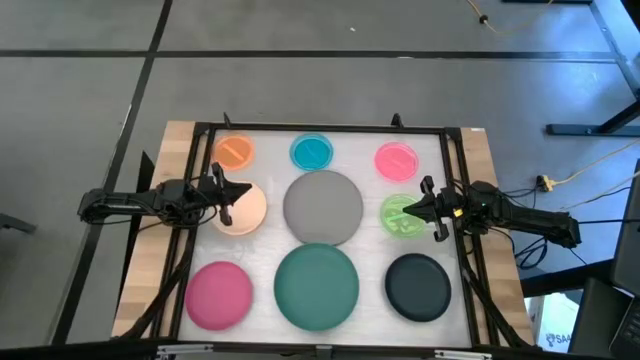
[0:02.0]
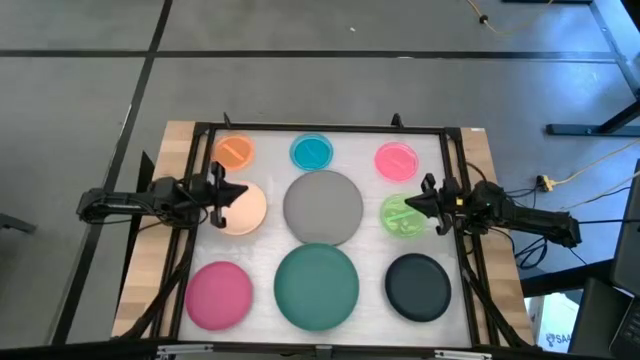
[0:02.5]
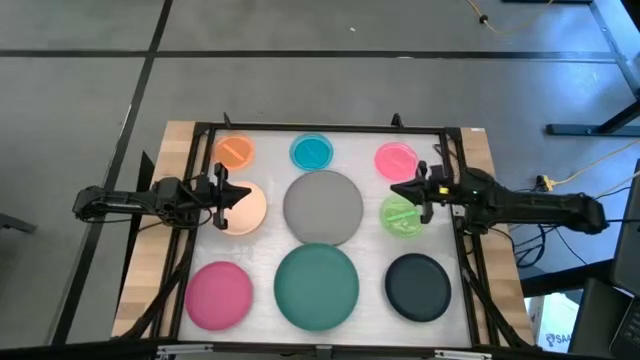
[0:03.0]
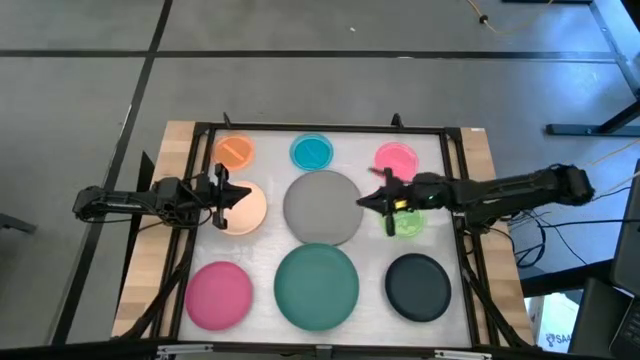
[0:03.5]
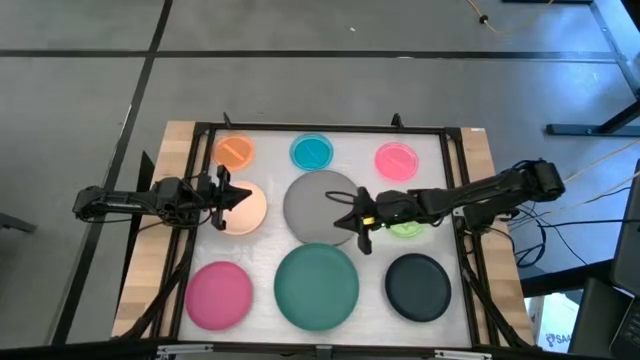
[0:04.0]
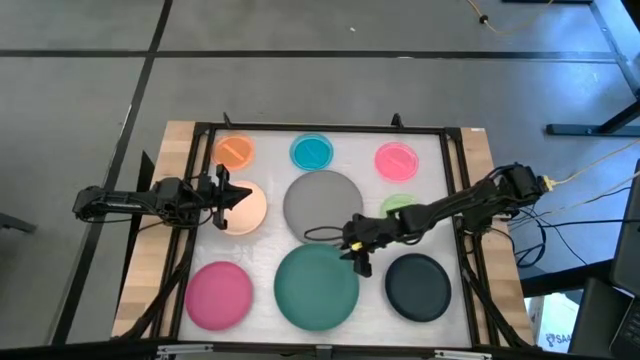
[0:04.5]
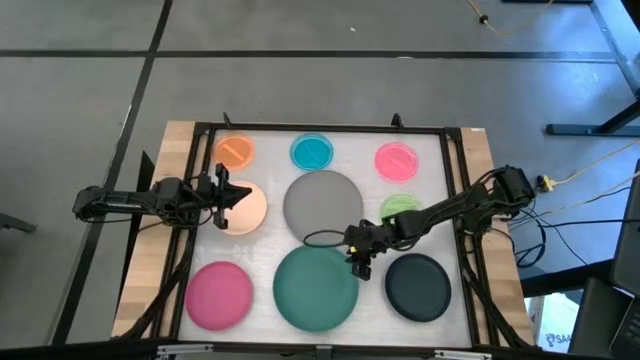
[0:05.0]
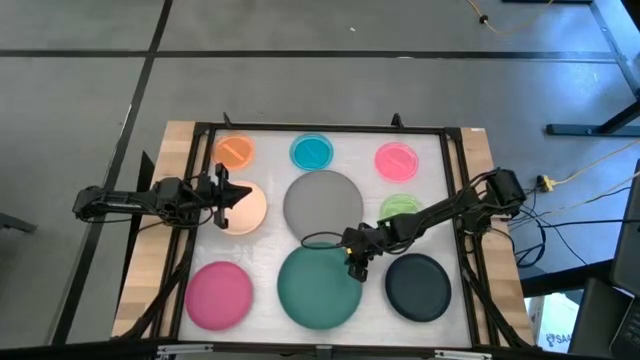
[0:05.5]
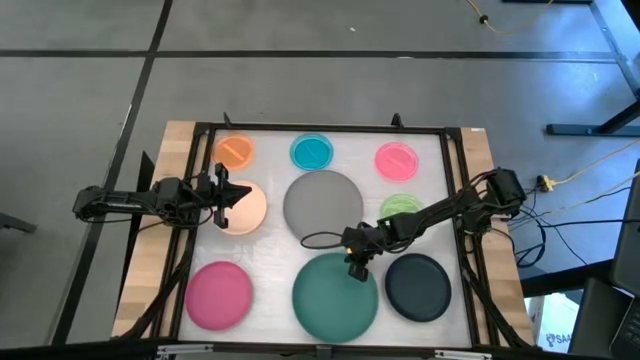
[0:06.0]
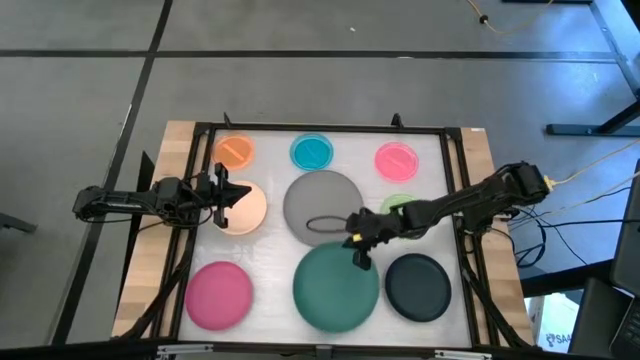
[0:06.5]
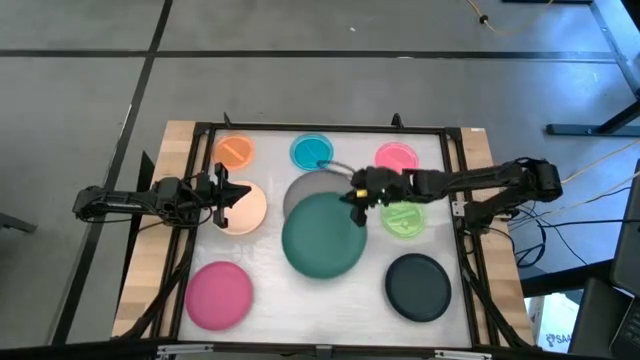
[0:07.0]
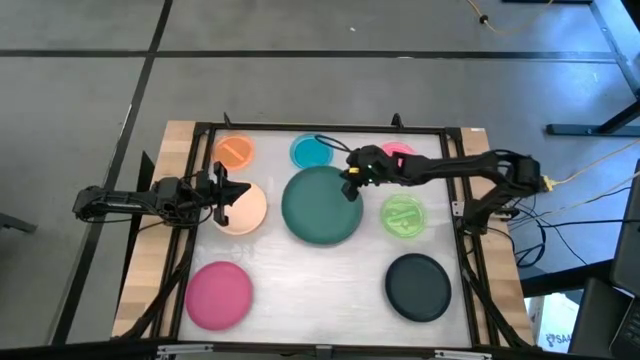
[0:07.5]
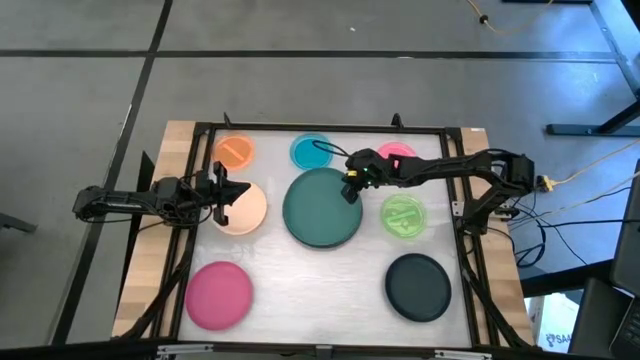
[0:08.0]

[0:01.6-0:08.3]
Task: Stack plastic plates
Stack the green plate on the gray plate

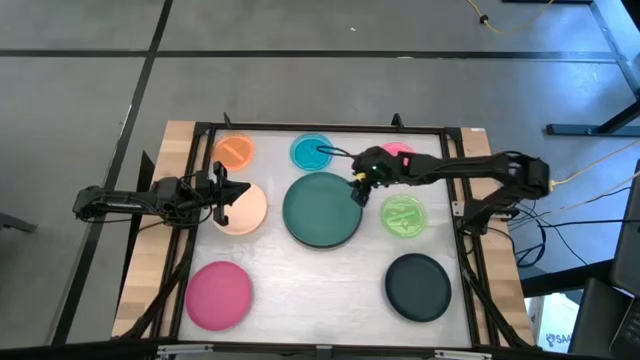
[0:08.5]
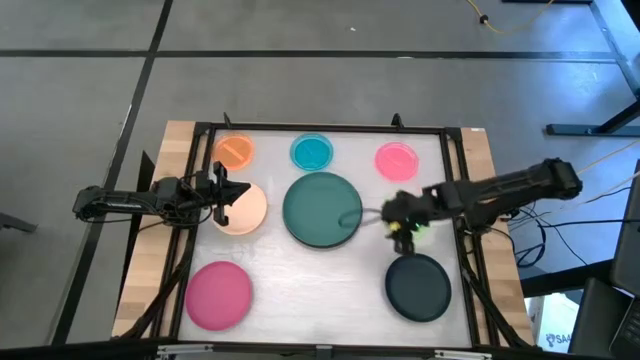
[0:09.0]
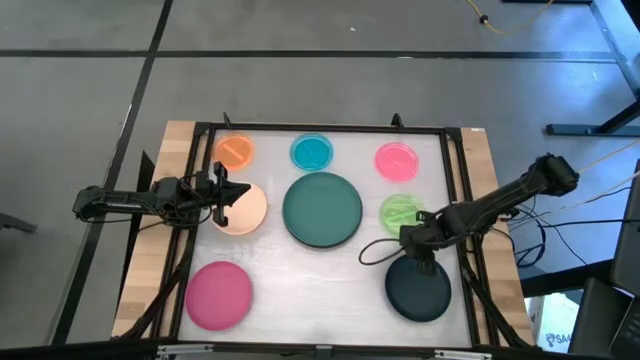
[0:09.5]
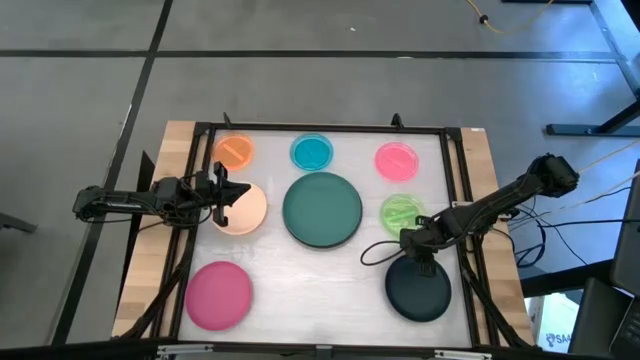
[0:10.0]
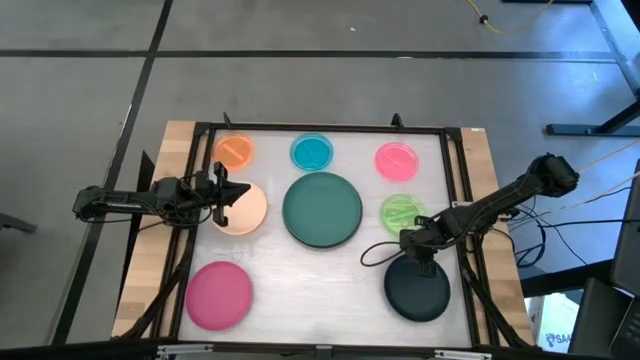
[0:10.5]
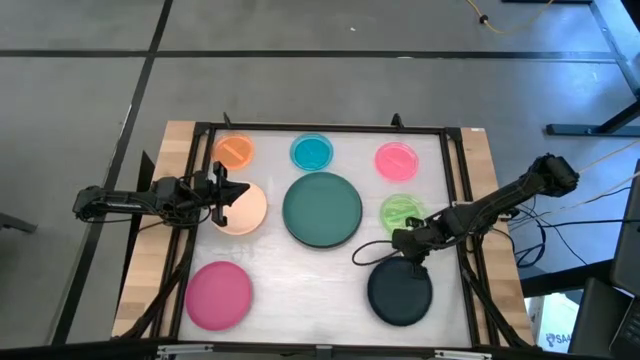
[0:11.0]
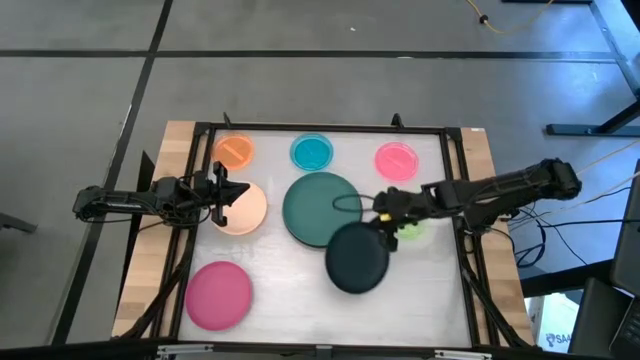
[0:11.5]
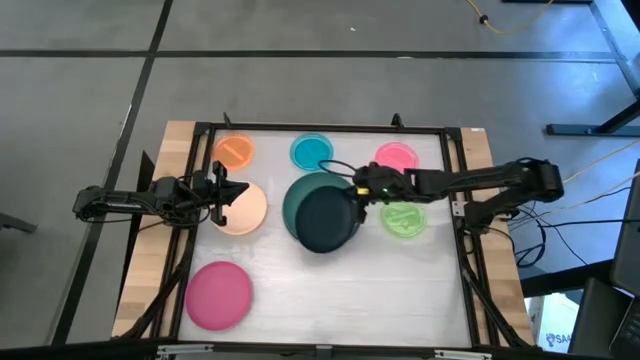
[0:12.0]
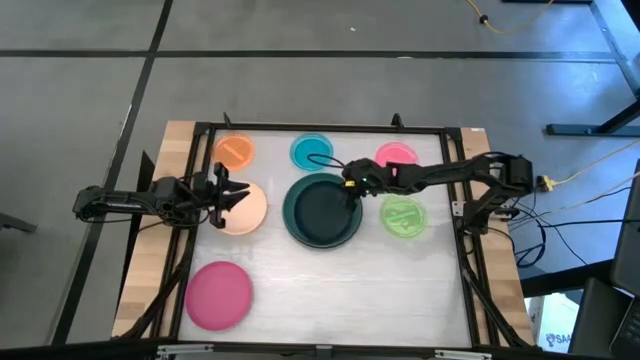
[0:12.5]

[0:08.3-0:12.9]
Stack the black plate on top of the green plate

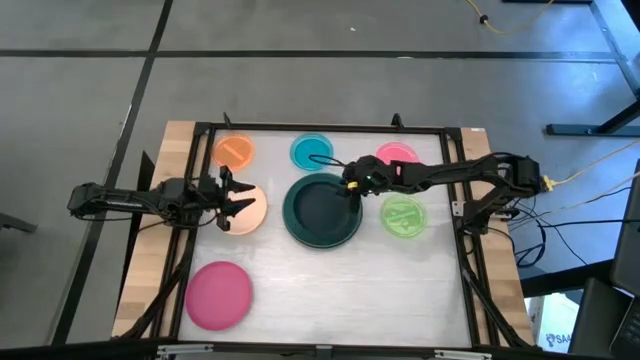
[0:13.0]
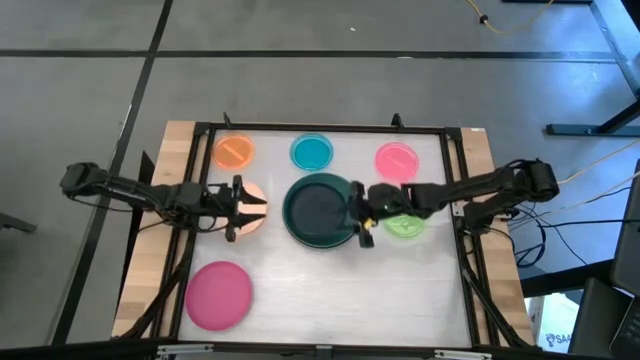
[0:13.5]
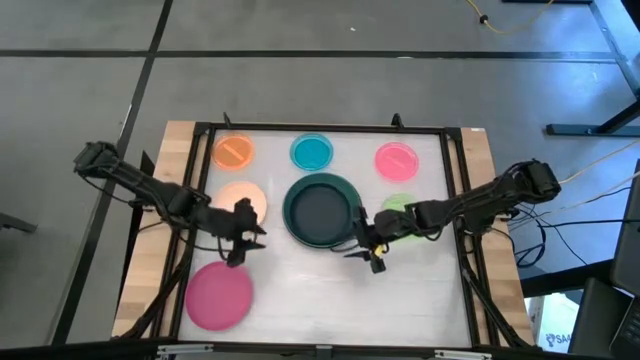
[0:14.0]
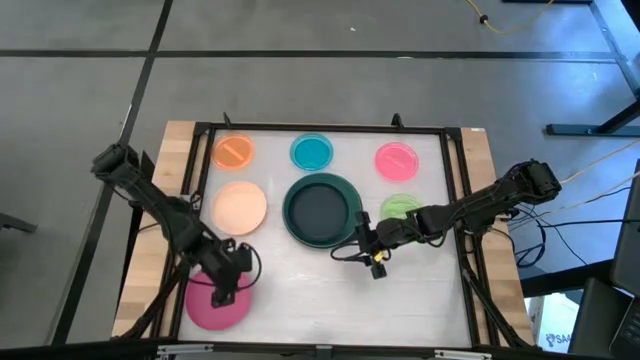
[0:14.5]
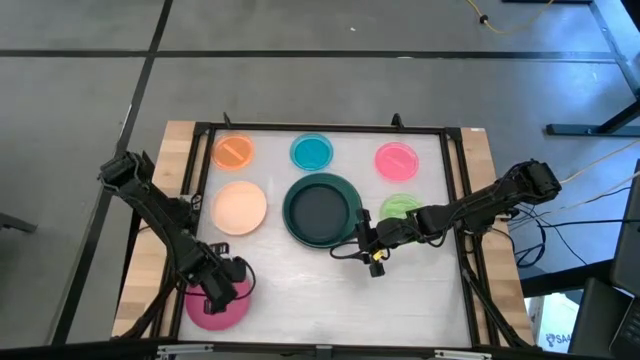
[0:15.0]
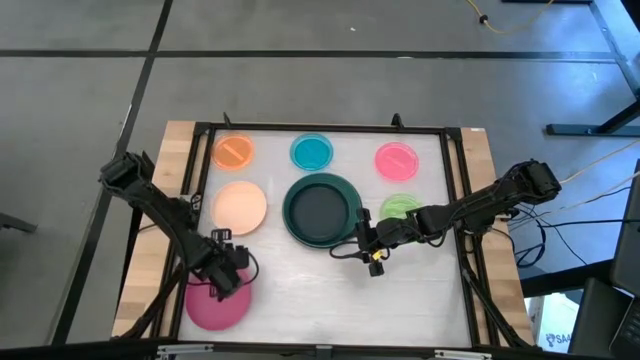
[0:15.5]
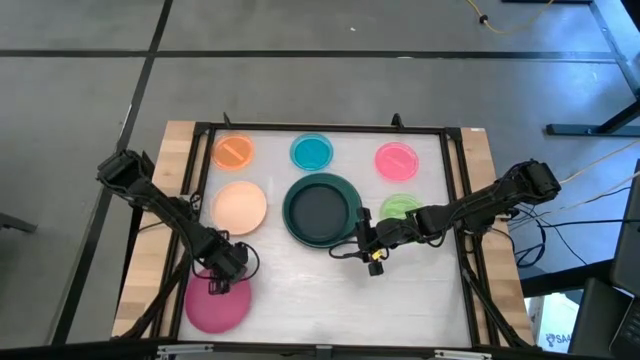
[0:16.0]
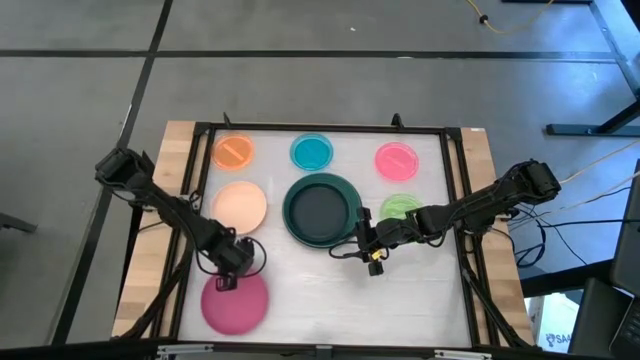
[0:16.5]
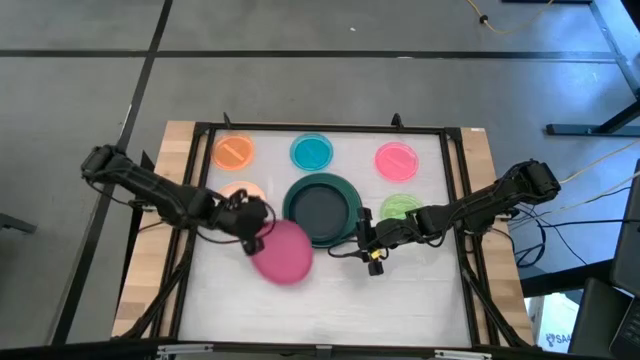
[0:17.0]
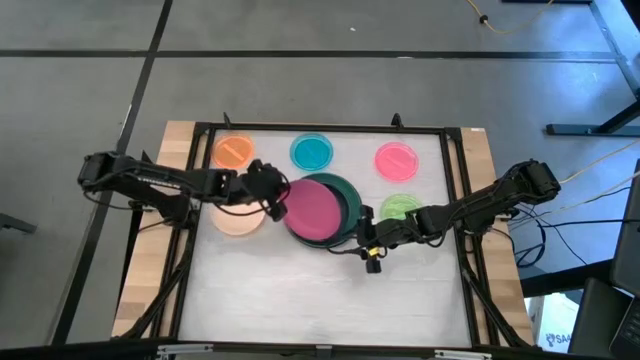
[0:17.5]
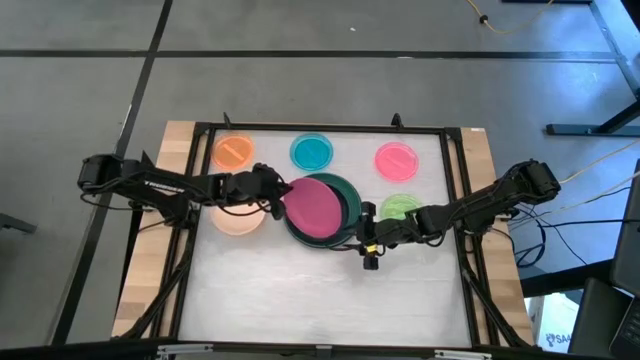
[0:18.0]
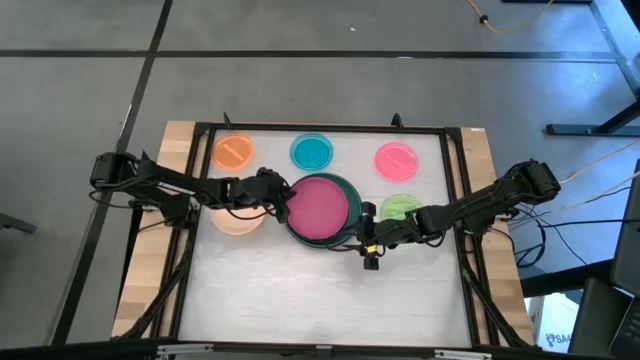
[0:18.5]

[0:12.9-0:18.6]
Stack the dark pink plate on top of the black plate

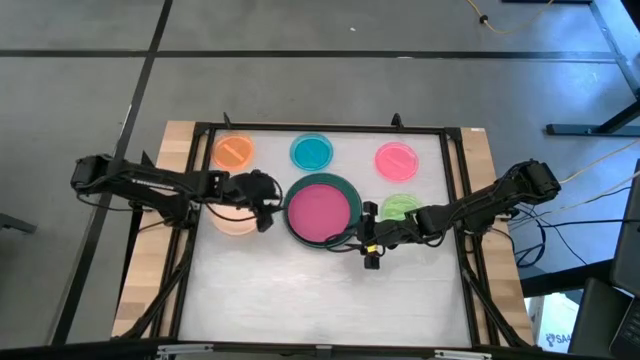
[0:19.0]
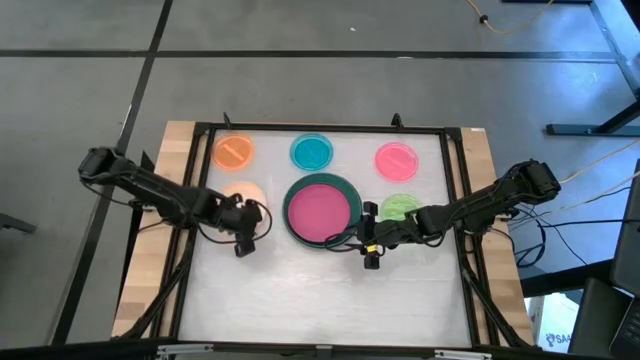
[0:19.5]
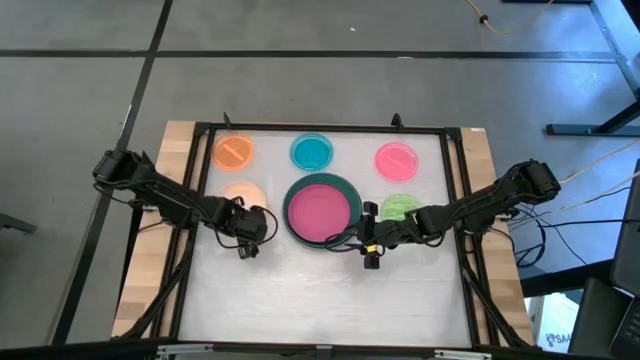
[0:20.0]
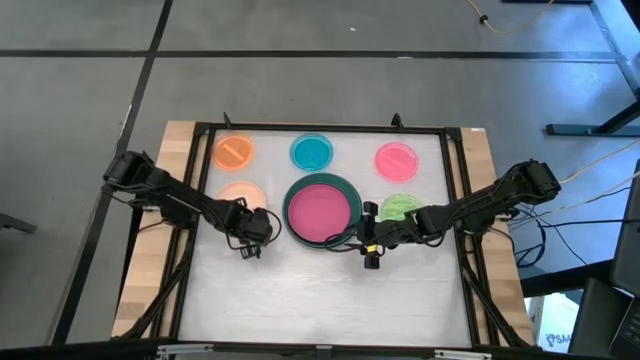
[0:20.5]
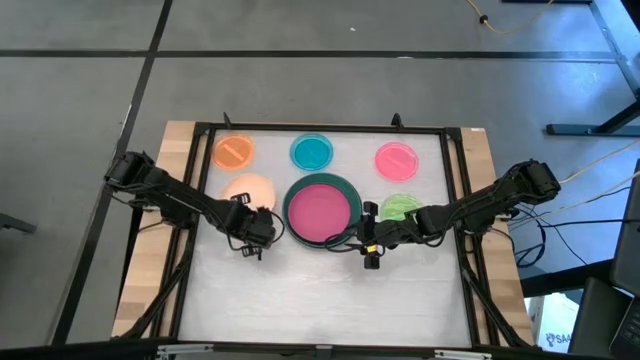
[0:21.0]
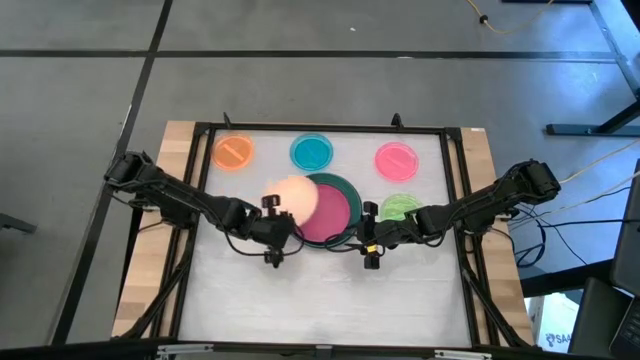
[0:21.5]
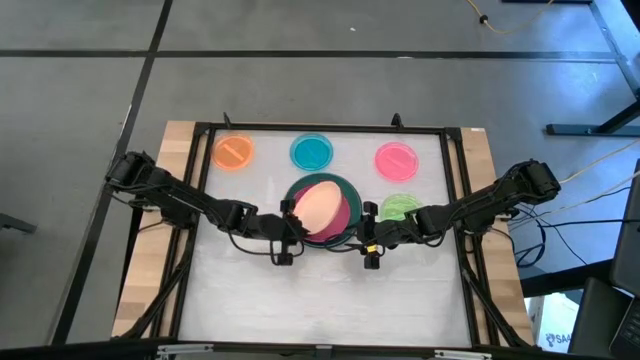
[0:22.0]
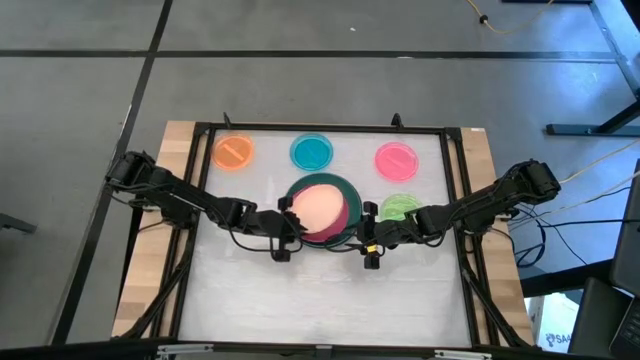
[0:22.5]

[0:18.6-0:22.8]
Stack the beige plate on top of the dark pink plate
